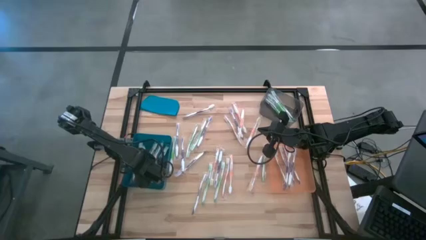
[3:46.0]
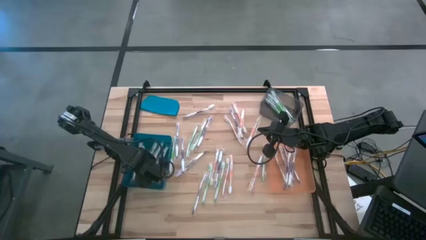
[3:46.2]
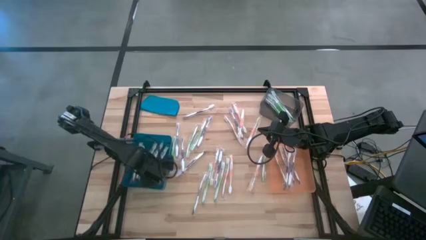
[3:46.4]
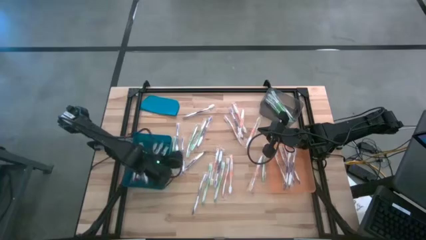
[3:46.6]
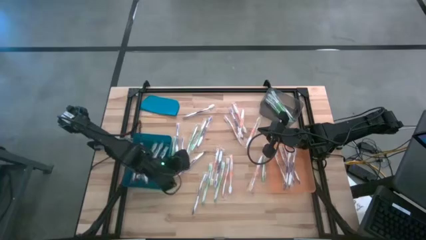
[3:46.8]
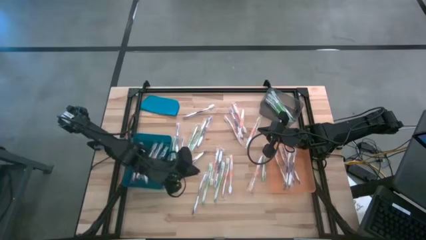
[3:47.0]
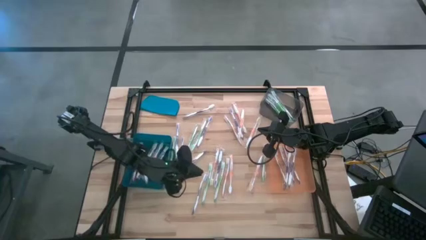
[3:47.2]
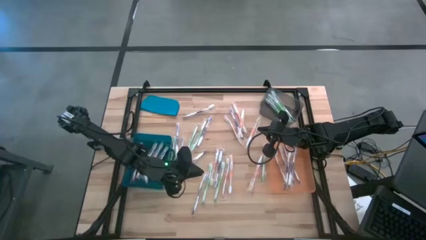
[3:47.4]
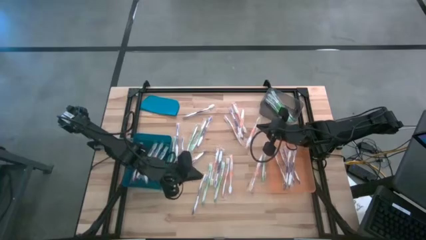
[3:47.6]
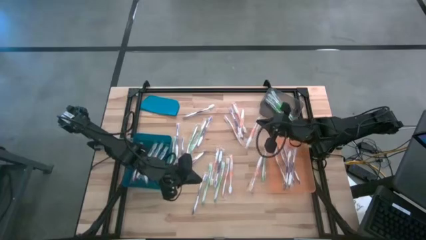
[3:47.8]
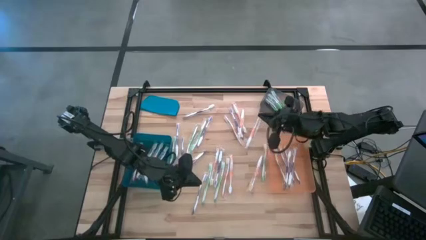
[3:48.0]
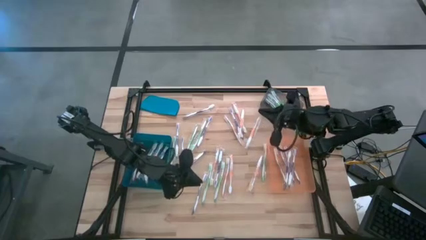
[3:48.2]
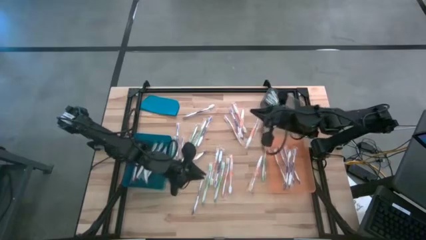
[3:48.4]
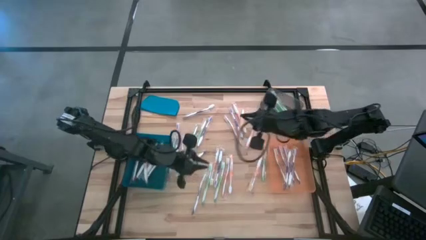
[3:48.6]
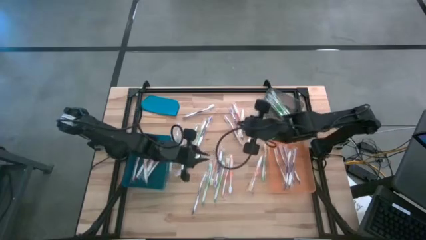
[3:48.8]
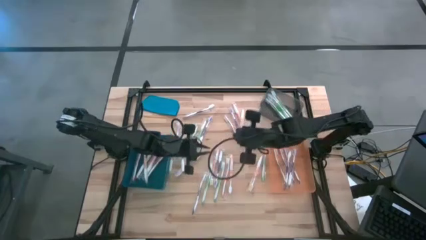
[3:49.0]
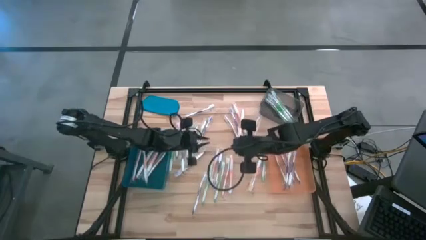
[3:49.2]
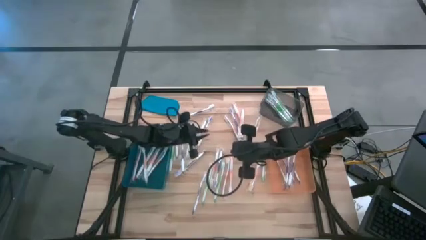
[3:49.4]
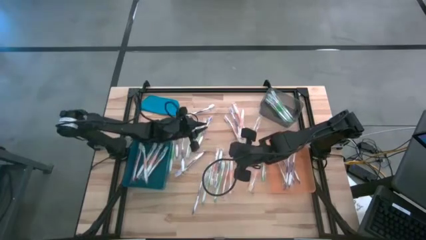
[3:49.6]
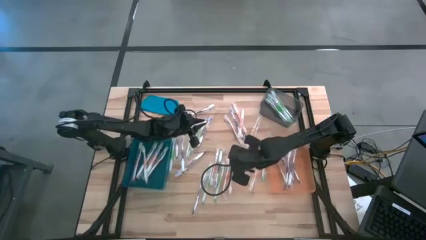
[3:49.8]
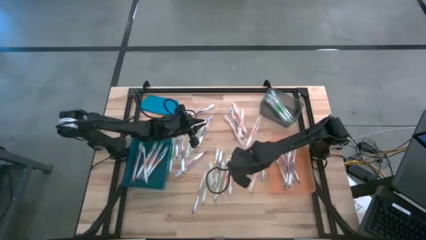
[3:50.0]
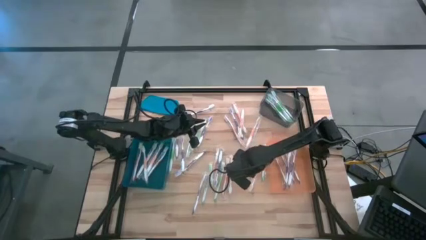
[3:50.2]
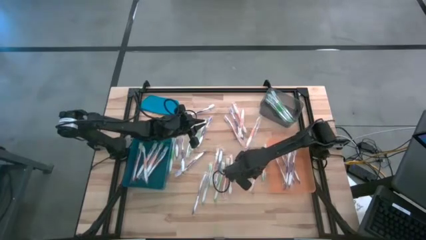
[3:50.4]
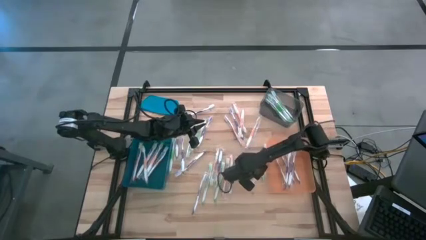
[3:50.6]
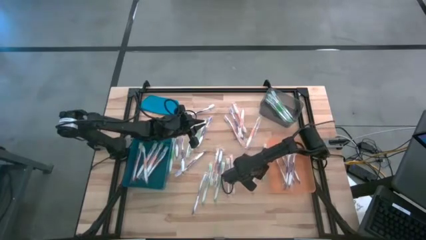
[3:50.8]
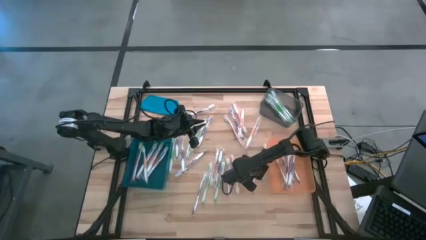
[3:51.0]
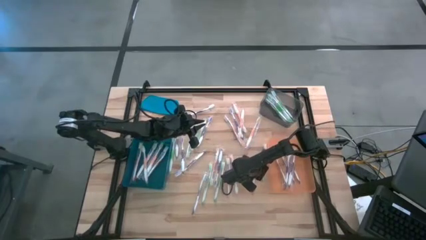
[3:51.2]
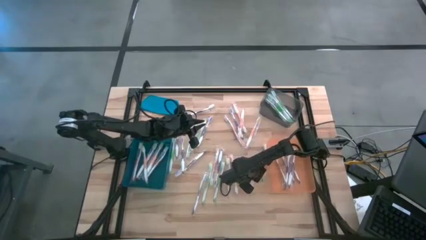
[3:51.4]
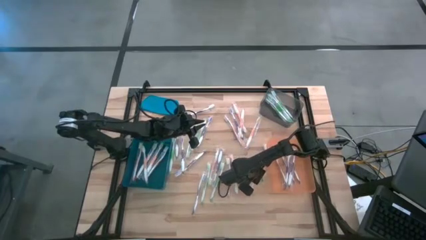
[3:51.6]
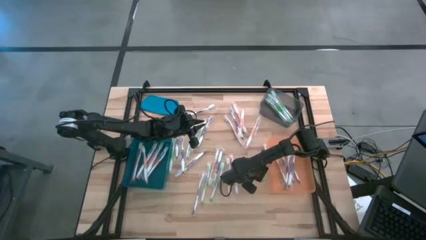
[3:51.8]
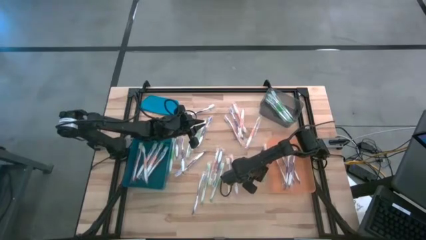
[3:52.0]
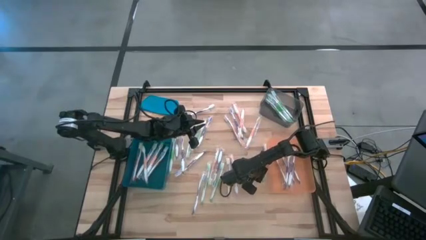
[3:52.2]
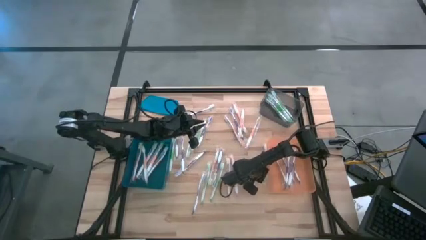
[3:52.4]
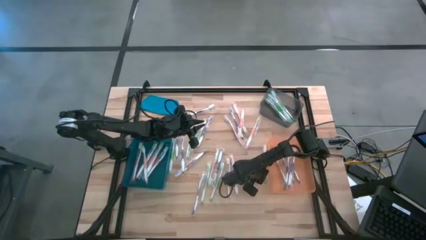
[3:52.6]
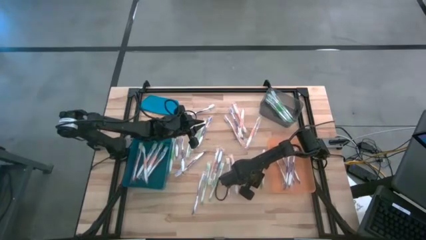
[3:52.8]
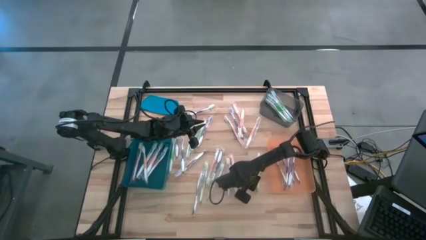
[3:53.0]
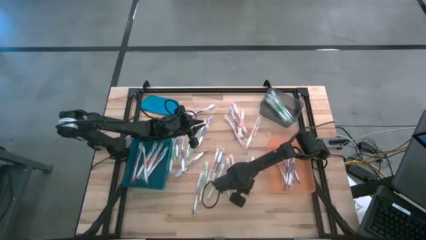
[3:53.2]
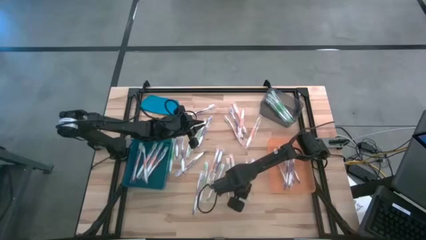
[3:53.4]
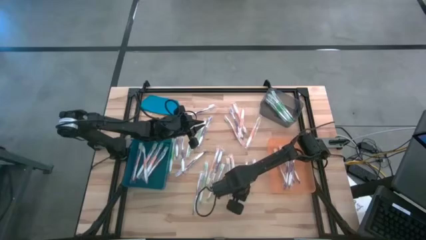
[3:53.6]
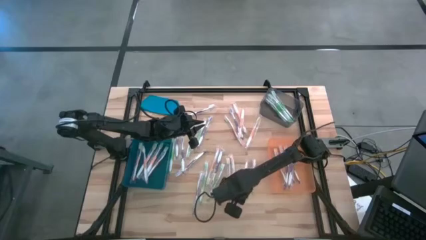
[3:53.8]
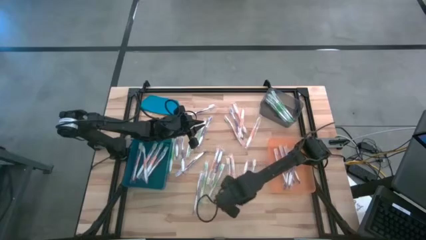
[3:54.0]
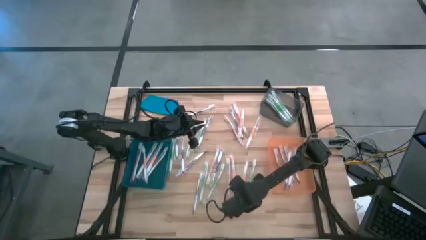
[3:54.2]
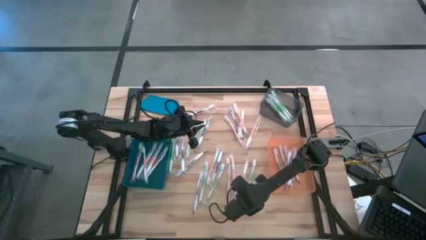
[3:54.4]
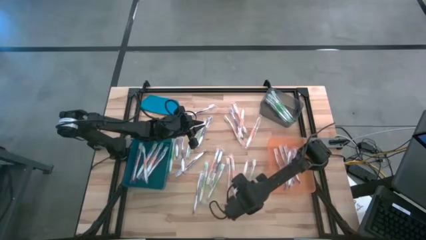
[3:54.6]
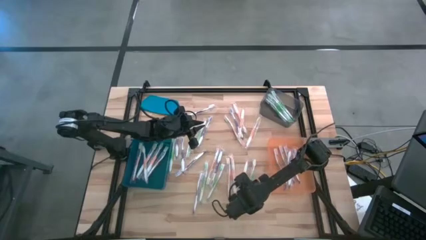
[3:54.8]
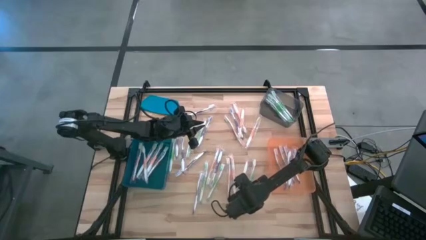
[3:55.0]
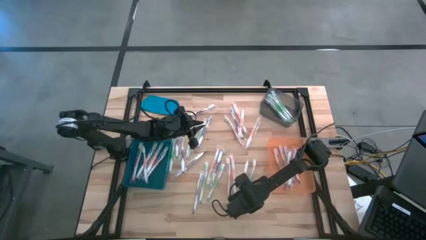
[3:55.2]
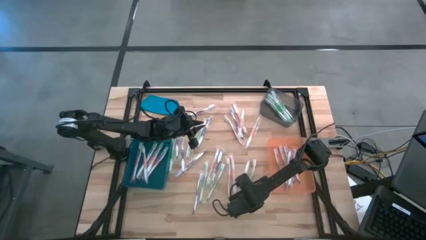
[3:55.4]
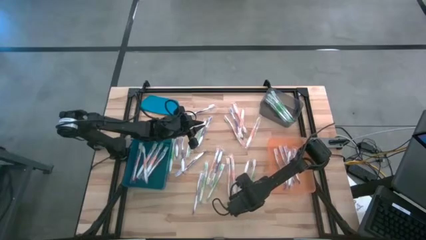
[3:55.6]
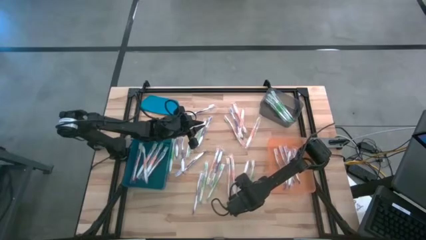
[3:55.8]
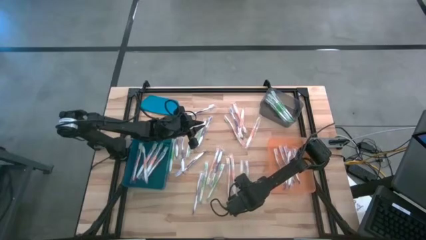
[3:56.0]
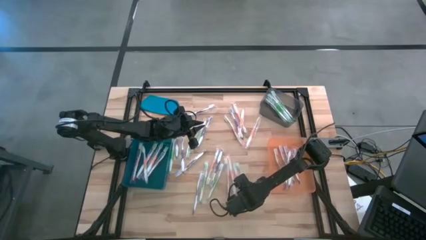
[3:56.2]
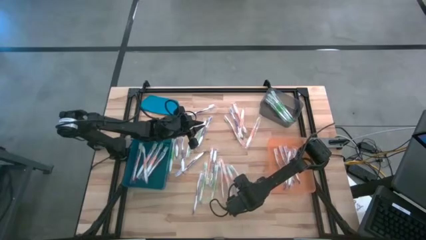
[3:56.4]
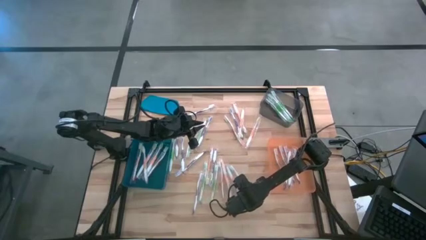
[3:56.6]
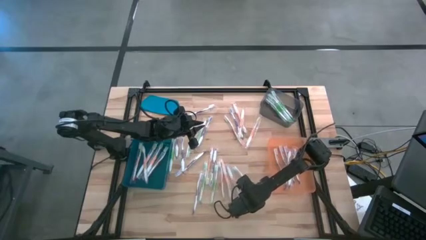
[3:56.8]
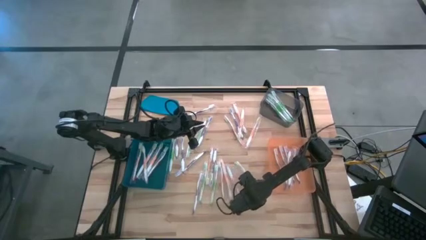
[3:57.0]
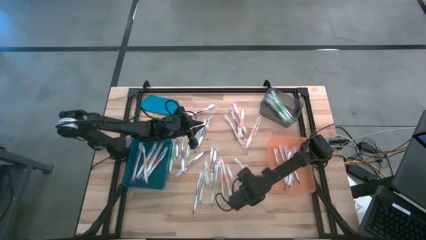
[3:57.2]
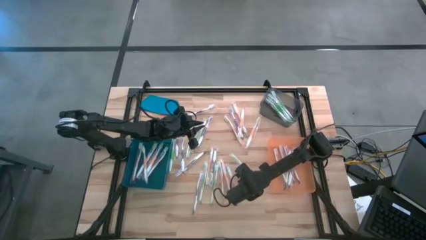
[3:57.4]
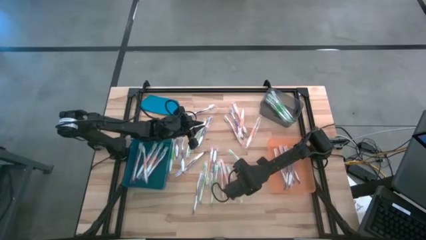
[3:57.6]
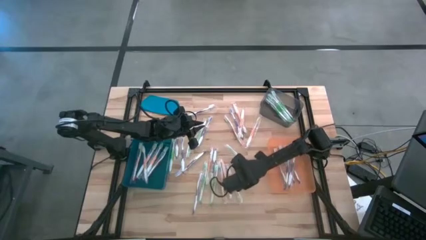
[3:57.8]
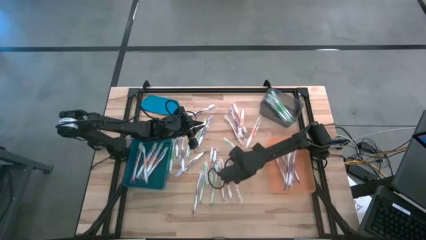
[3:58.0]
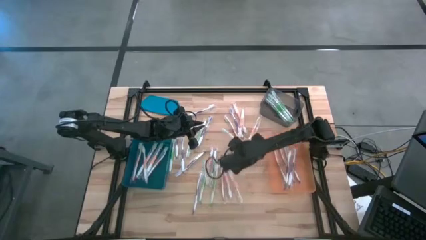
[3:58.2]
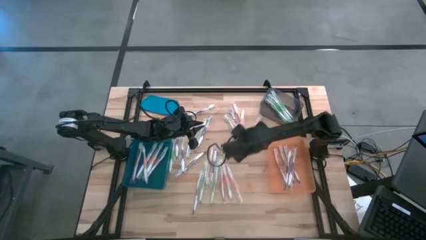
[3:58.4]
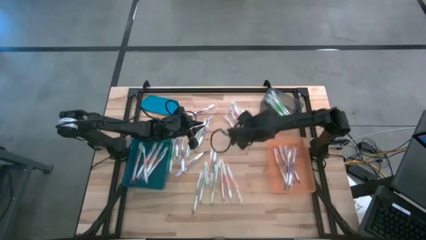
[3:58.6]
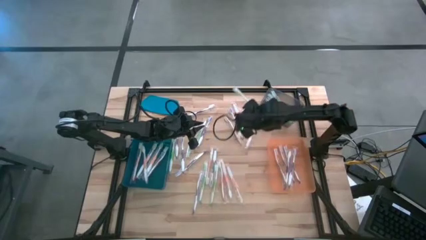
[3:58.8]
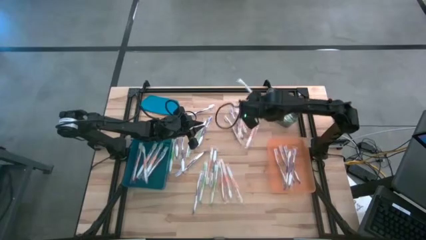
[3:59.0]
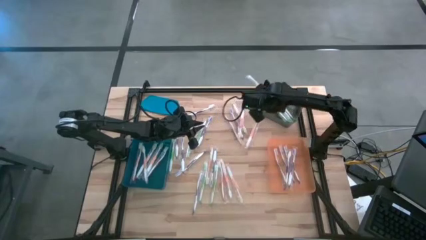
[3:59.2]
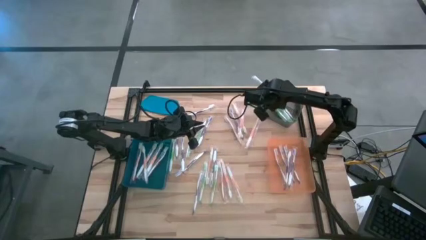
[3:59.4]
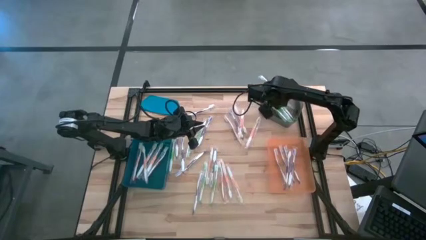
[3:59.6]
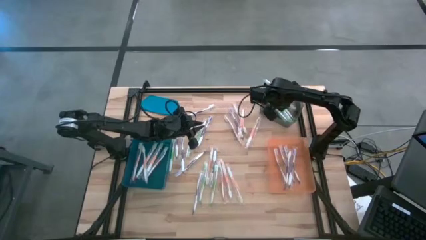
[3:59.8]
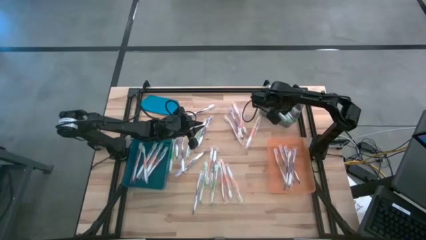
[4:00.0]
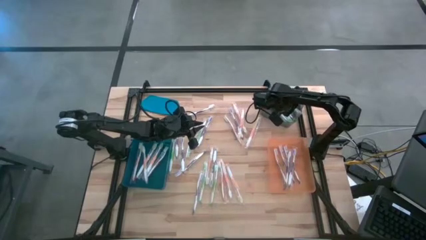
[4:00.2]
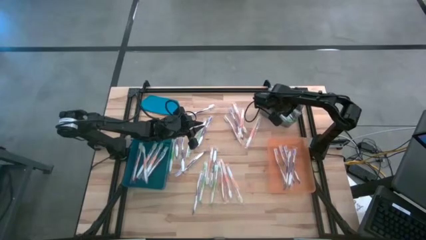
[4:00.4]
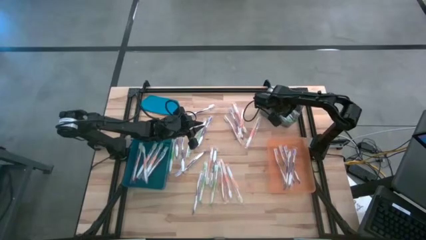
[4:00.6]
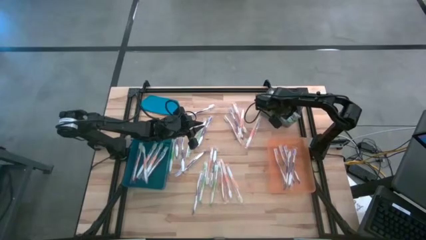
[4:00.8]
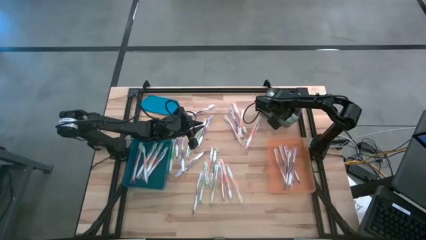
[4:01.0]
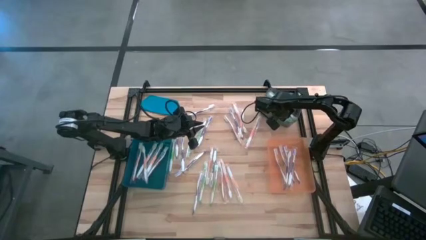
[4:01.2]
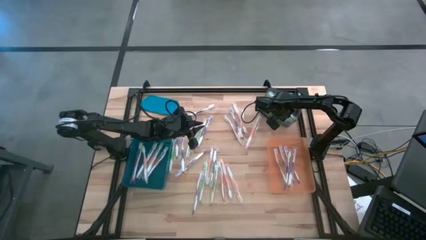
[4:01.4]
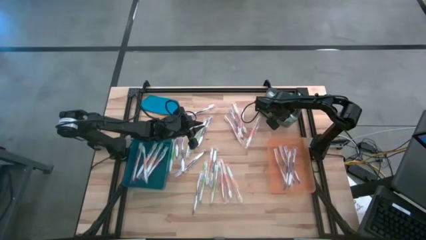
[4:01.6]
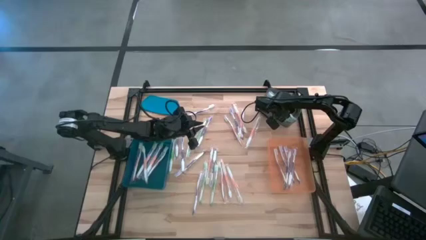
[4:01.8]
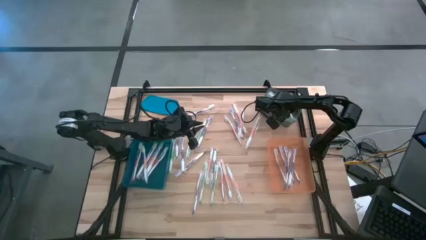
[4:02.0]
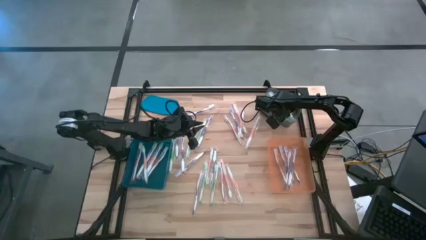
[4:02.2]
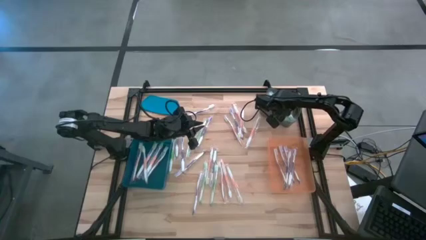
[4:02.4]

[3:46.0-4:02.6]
Task: Pick & Place Toothbrushes
Put the green toothbrush into the black bin
